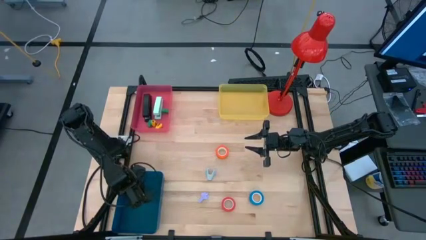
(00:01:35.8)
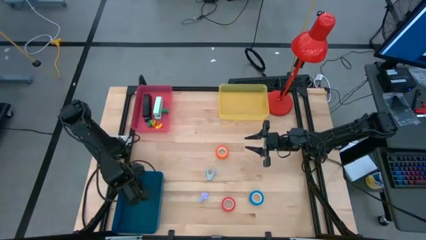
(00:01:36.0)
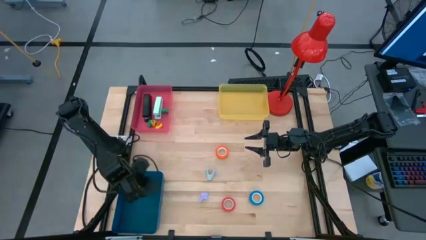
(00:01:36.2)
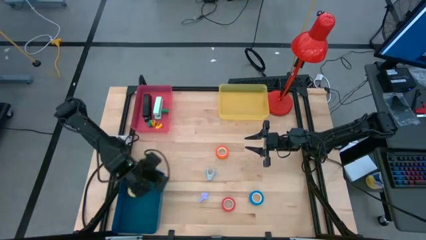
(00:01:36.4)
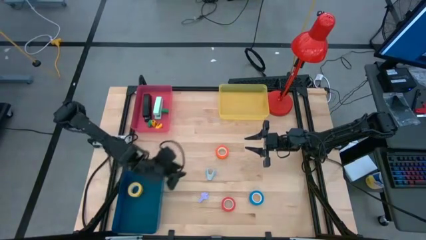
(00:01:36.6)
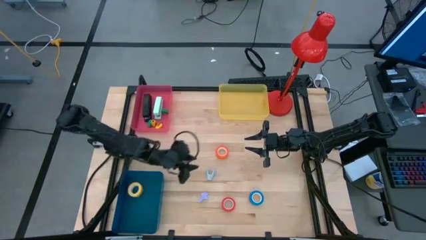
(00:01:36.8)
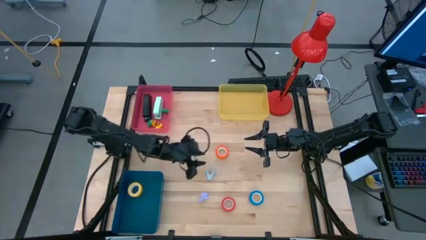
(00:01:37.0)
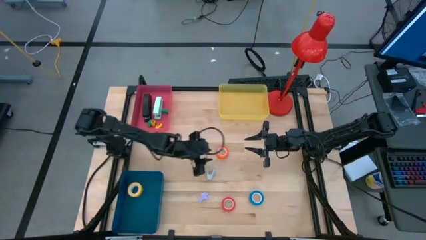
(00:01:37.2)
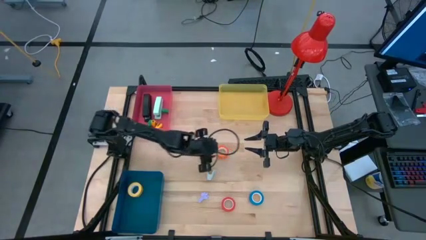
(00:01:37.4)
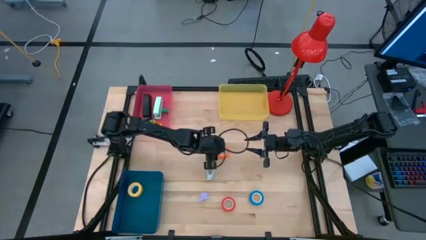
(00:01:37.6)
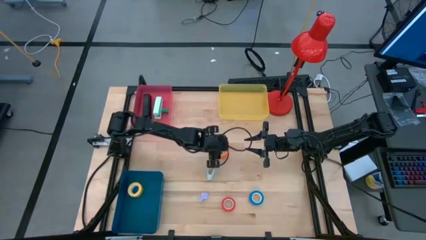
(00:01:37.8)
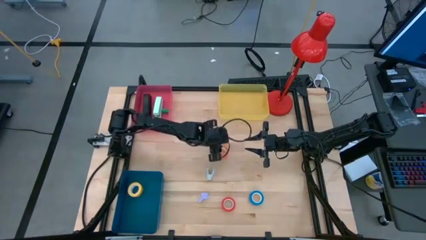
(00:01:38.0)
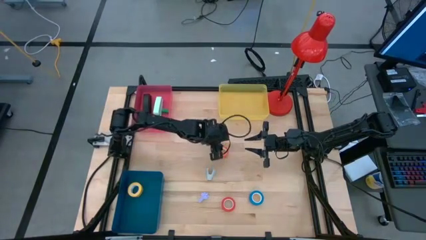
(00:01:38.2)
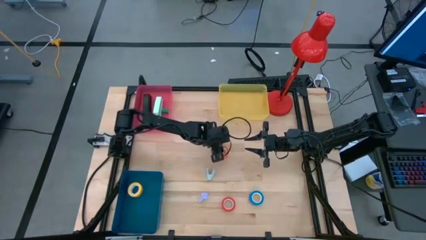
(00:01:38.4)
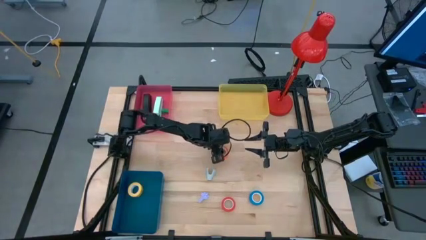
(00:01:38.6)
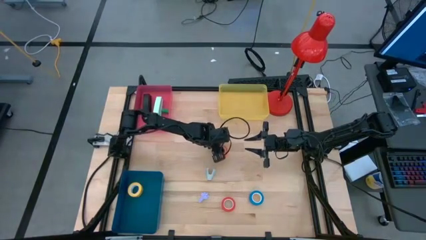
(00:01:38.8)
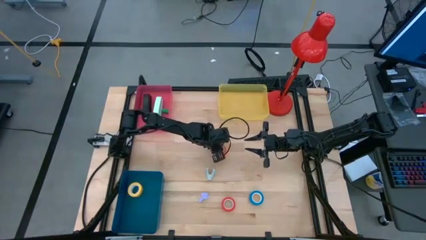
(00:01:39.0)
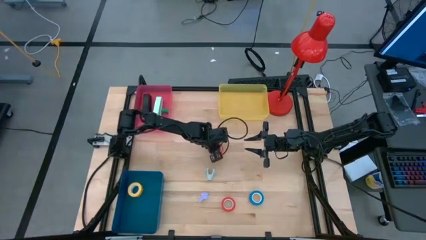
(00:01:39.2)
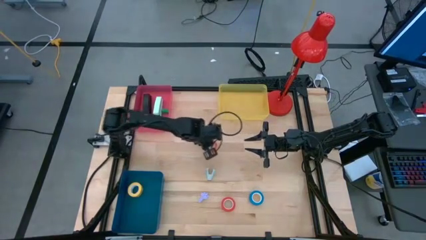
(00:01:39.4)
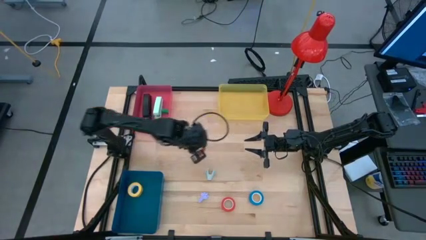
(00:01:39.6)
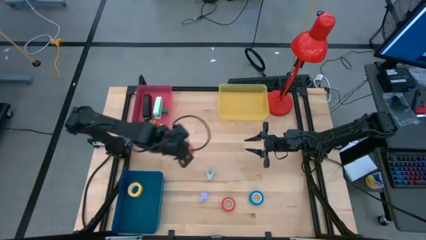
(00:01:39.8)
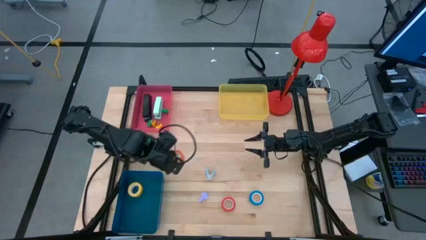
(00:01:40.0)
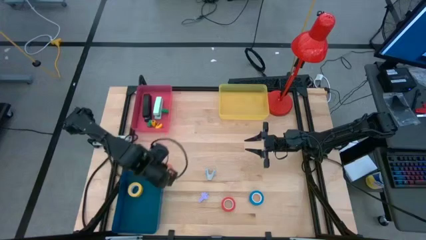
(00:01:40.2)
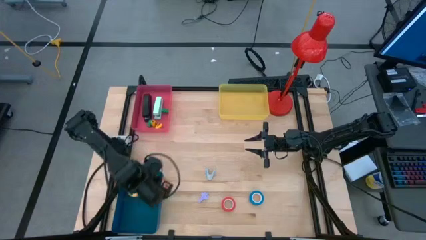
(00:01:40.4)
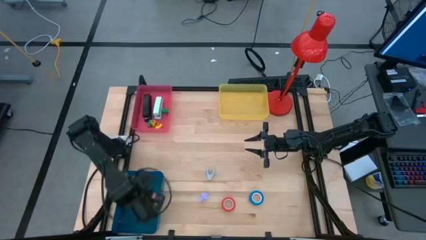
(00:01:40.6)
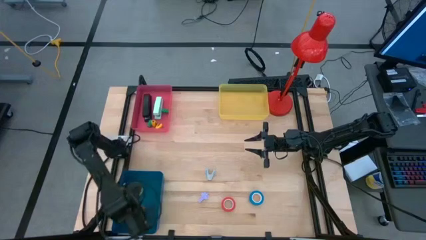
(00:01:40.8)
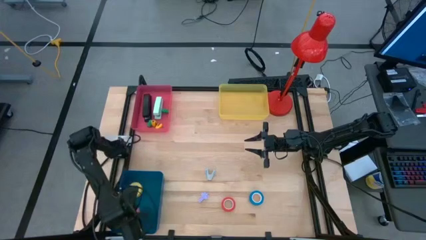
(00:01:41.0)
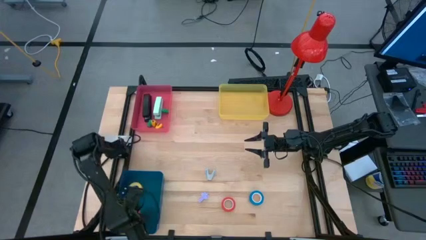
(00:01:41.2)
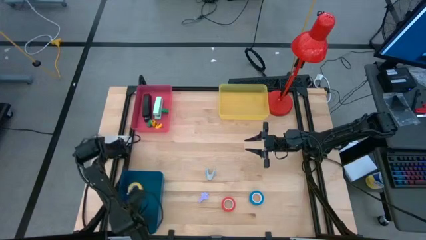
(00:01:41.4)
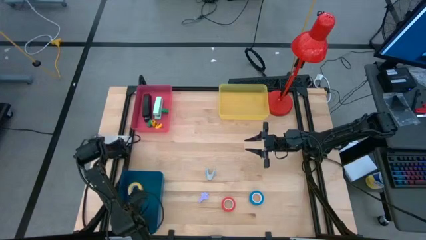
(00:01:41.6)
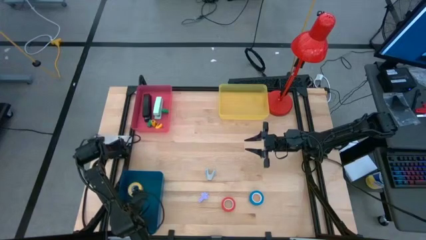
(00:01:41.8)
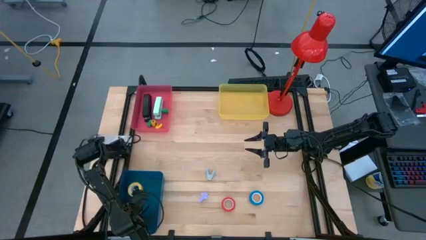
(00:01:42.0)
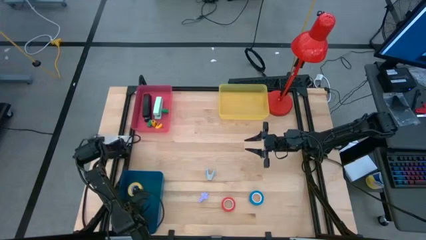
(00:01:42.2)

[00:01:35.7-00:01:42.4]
Task: Pick and place Stapler, Stapler remover, tape
Put the orange tape into the blue bin

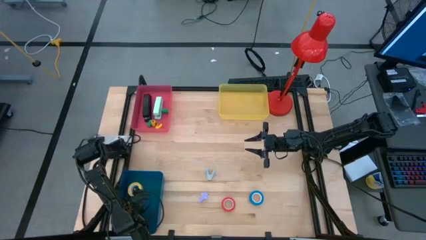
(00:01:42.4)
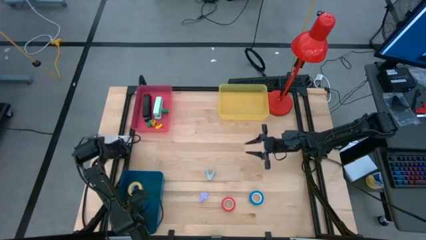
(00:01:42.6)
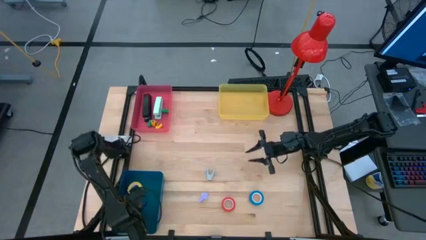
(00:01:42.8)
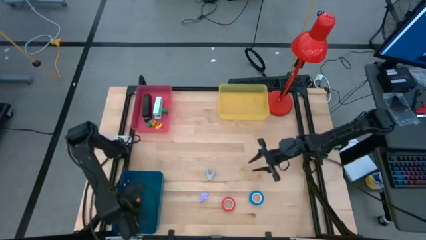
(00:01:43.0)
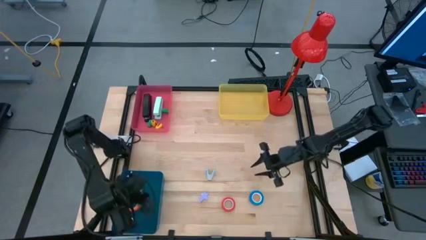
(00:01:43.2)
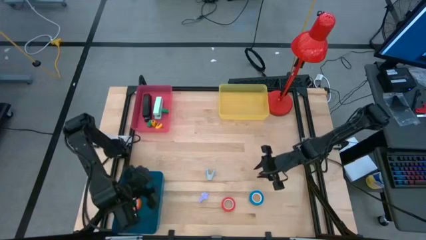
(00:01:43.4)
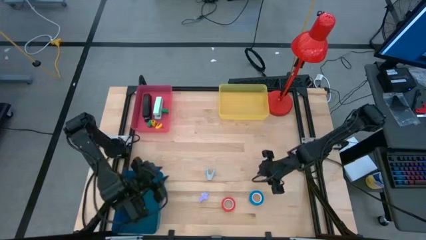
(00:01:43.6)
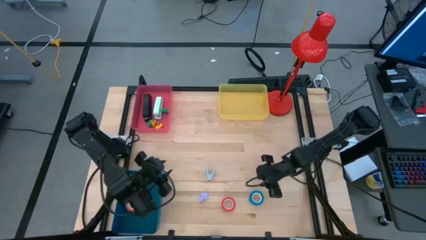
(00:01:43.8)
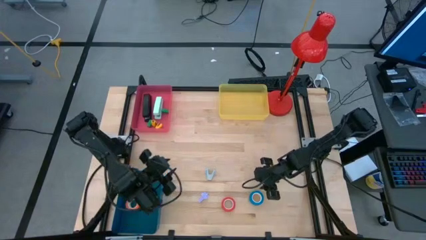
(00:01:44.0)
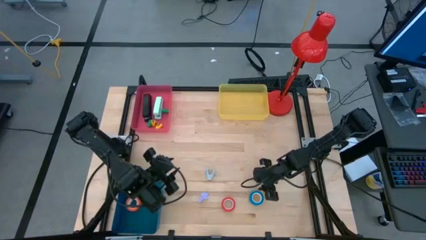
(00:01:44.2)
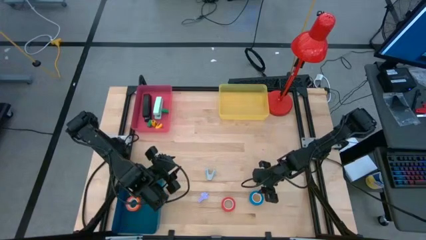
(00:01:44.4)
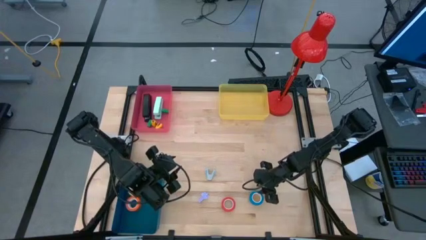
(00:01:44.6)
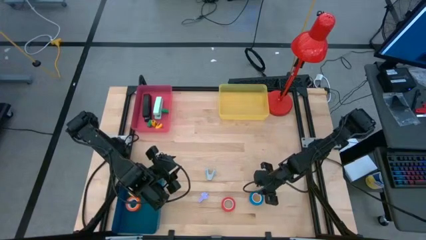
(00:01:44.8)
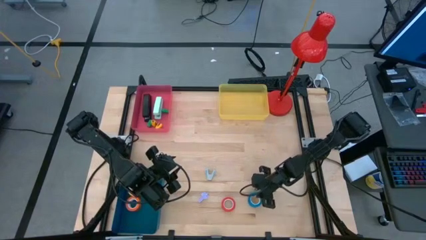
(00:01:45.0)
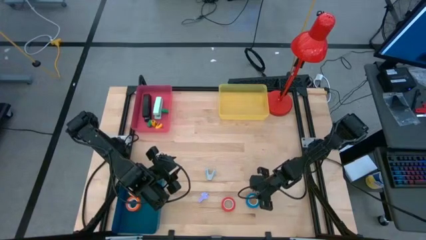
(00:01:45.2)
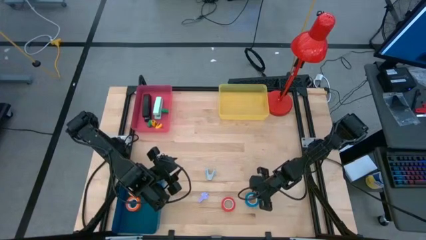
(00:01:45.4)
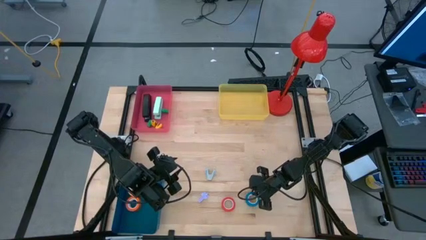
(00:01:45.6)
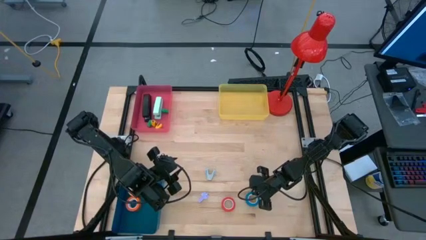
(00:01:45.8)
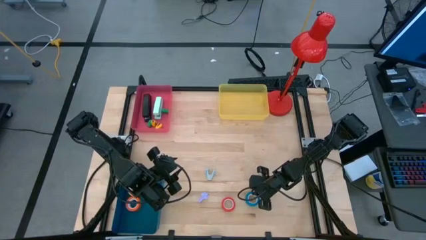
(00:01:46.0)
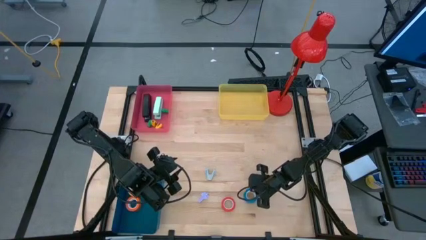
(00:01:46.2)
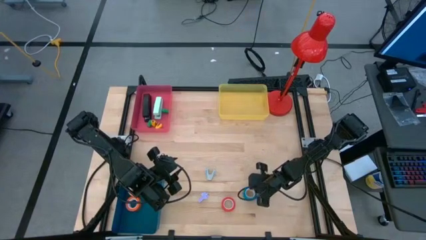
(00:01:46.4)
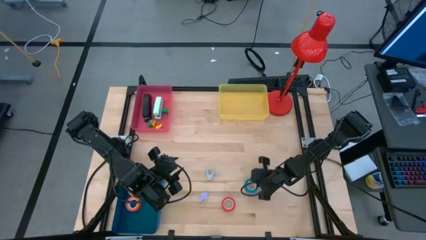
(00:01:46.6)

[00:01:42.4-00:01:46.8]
Put the blue tape into the blue bin

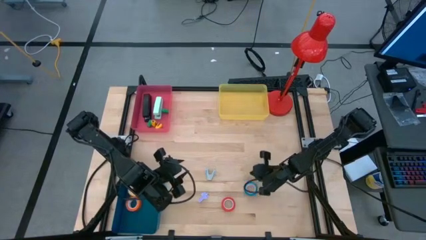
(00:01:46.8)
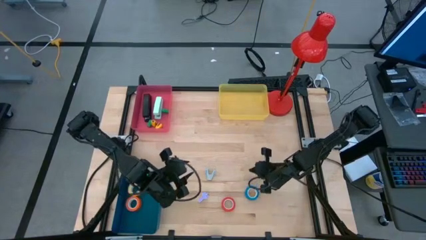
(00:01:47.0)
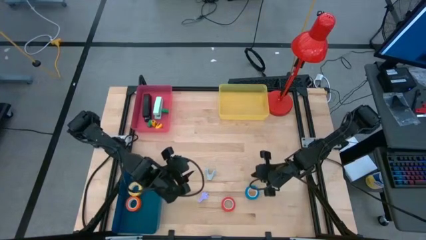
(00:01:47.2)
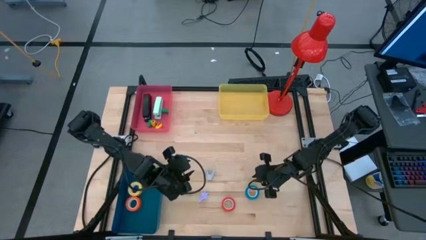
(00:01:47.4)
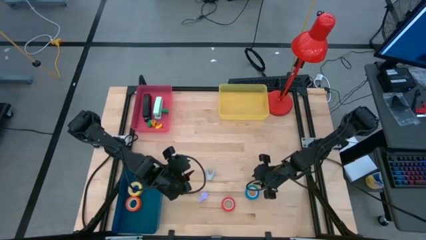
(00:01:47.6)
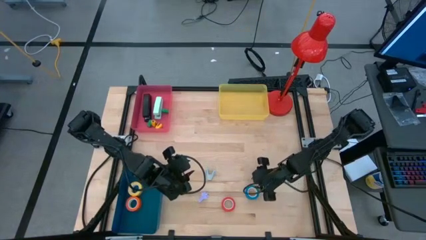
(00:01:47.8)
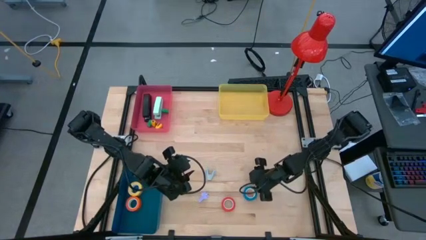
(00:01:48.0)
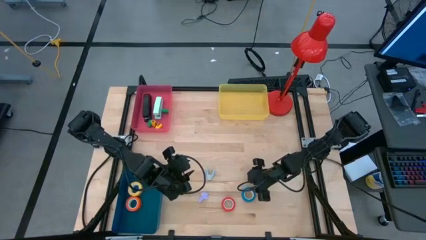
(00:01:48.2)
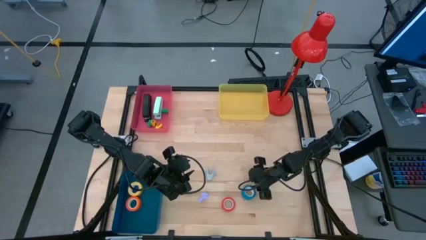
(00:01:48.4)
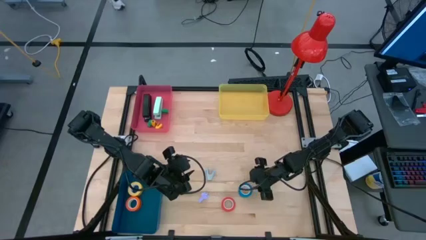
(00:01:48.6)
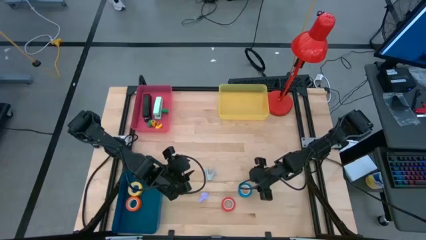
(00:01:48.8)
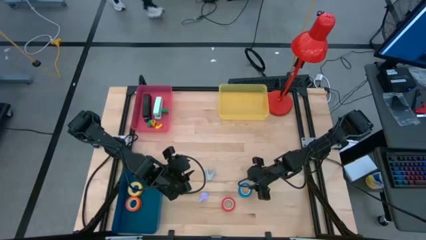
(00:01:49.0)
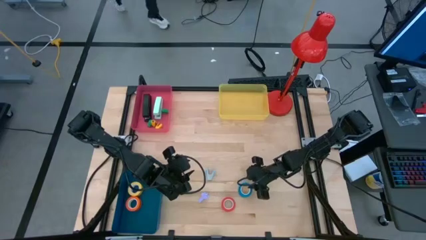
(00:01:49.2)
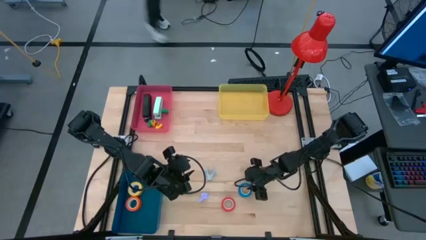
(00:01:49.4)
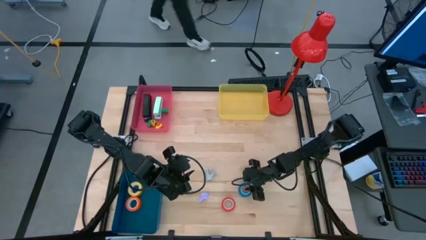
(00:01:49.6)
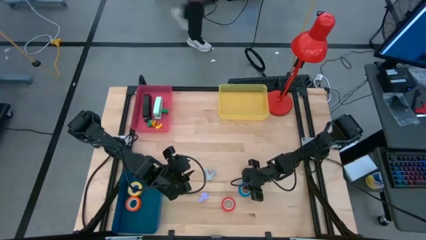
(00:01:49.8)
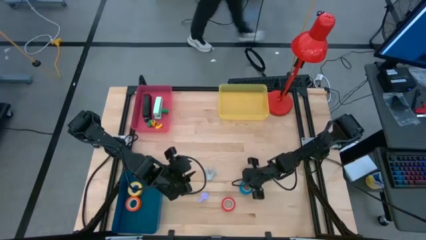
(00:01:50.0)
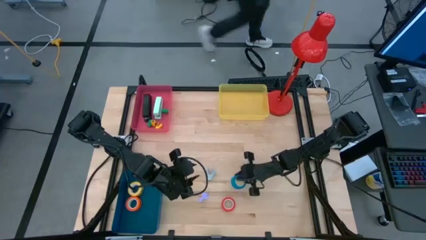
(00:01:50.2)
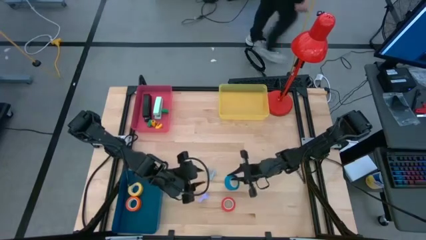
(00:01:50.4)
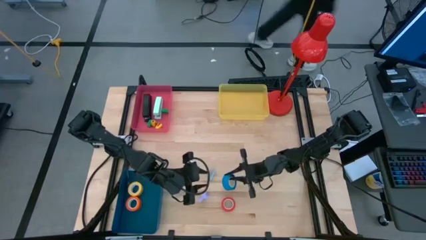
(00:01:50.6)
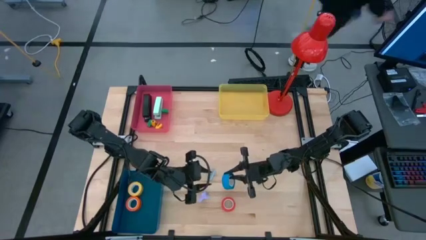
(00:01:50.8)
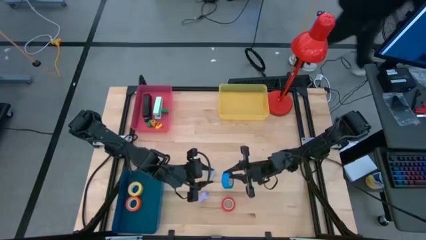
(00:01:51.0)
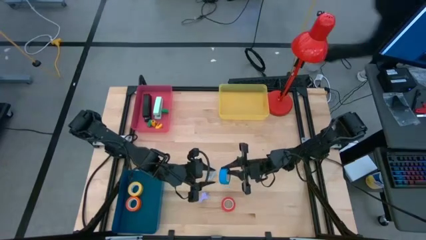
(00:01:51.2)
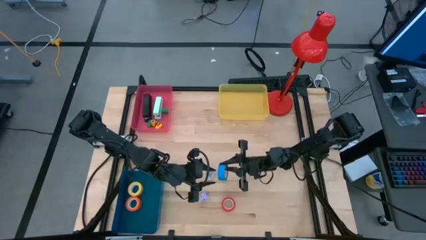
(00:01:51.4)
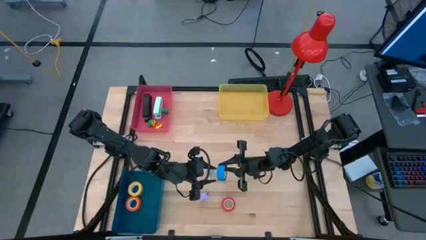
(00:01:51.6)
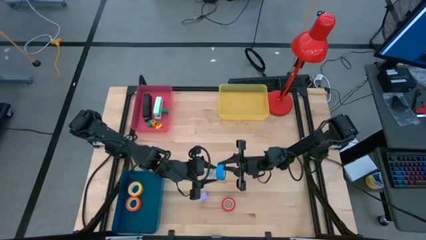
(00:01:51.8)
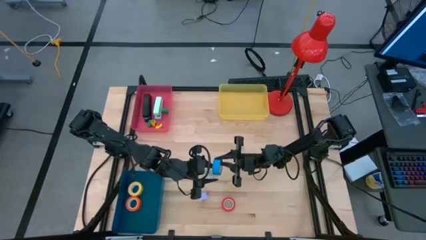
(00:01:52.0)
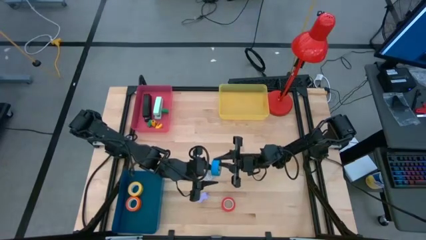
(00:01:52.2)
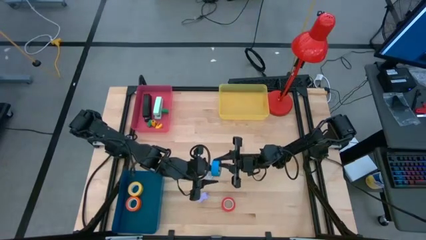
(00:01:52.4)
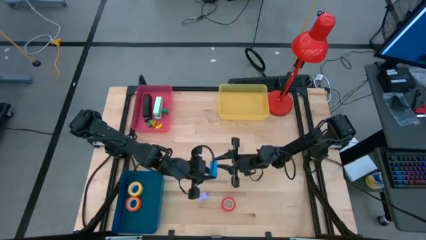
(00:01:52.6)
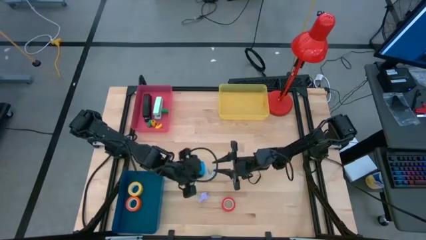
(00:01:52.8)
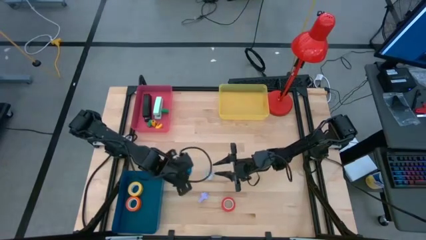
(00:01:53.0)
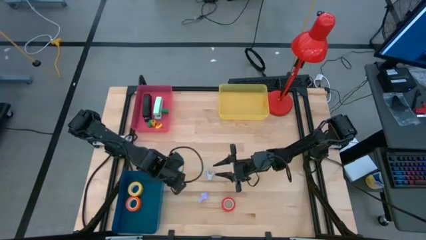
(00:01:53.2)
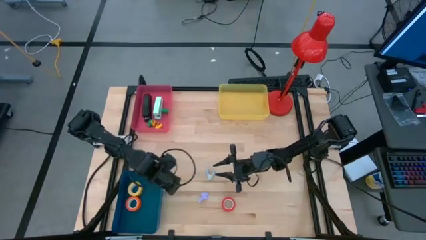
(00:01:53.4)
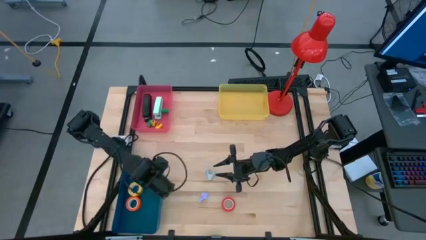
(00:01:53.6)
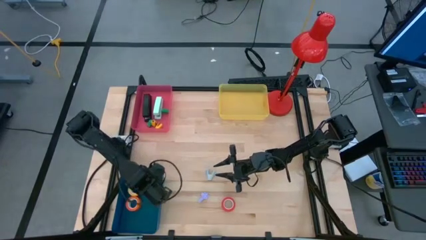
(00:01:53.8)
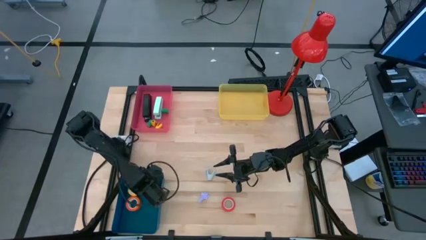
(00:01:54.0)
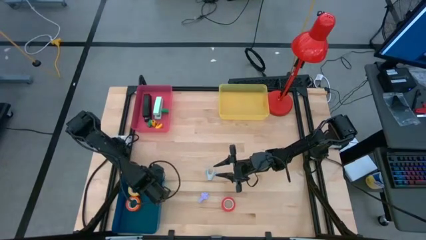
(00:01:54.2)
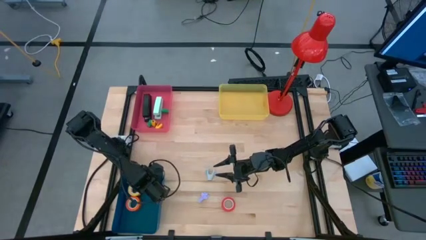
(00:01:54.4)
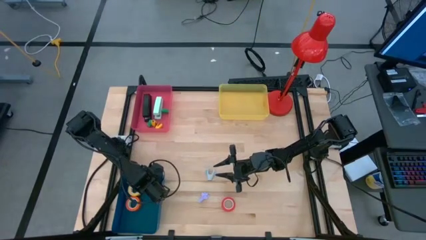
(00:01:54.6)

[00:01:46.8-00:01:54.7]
Put the blue tape into the blue bin
